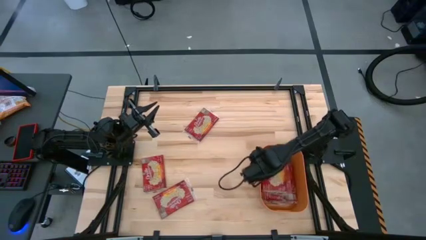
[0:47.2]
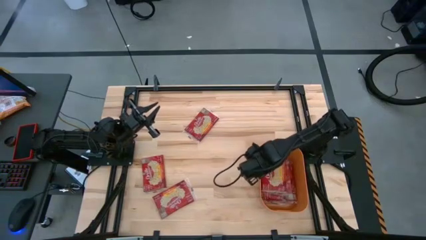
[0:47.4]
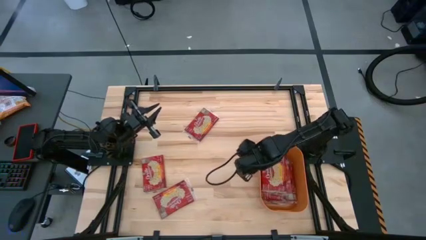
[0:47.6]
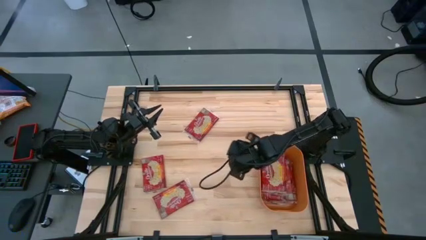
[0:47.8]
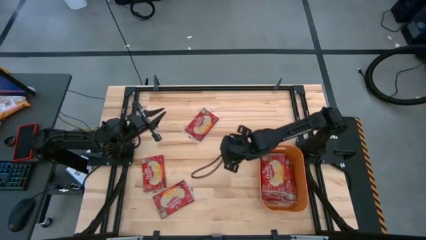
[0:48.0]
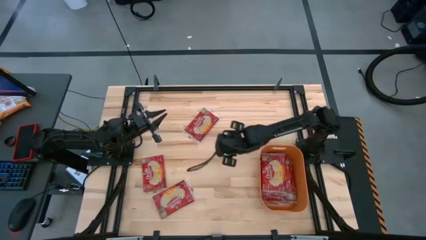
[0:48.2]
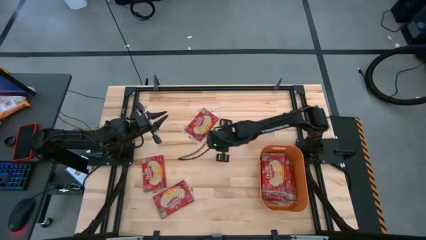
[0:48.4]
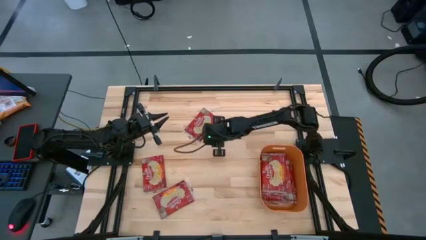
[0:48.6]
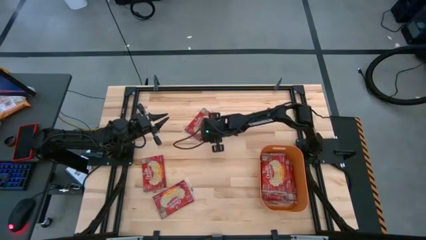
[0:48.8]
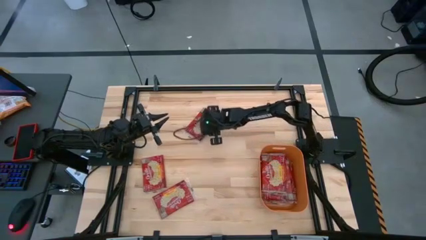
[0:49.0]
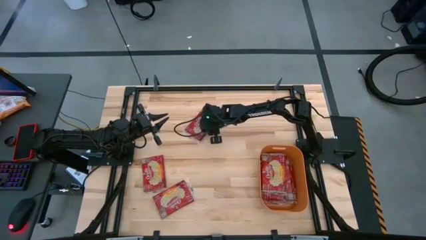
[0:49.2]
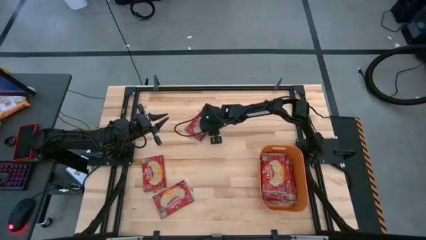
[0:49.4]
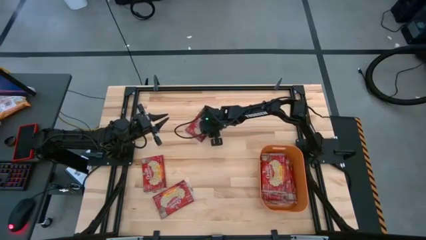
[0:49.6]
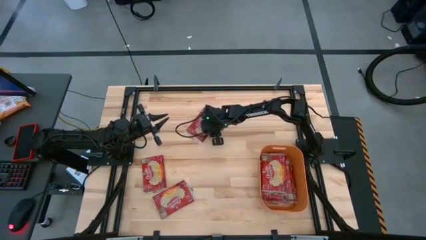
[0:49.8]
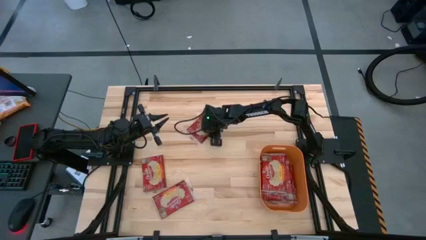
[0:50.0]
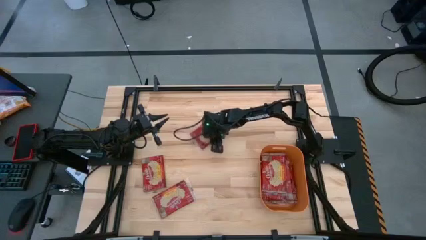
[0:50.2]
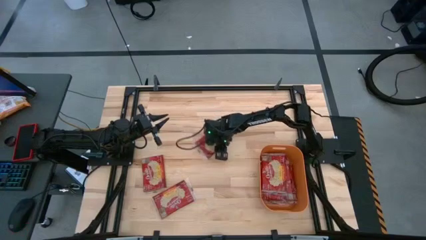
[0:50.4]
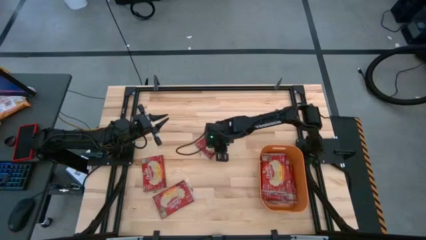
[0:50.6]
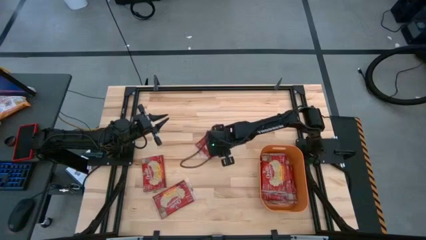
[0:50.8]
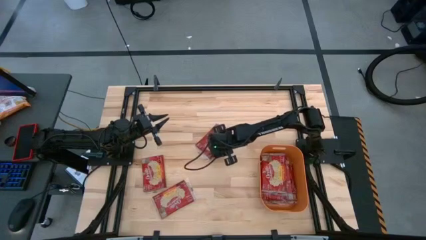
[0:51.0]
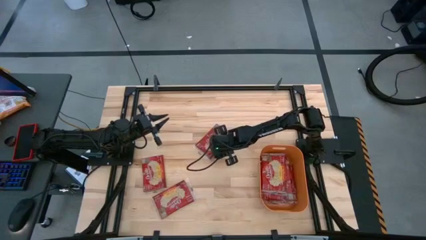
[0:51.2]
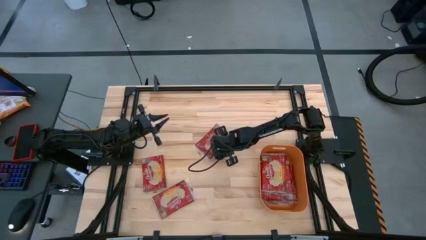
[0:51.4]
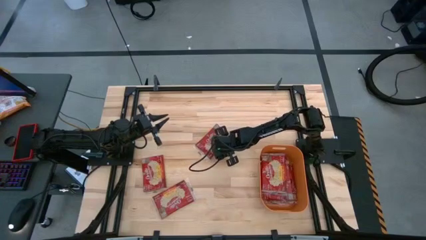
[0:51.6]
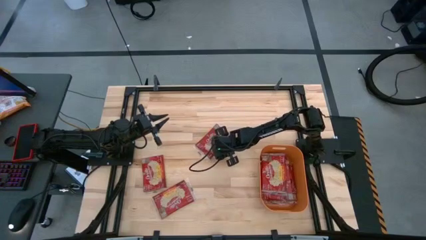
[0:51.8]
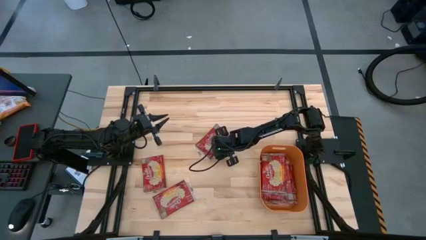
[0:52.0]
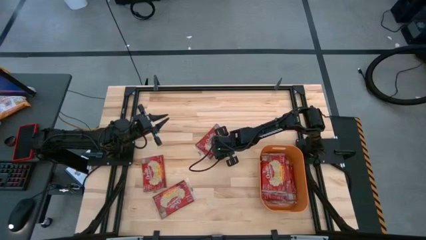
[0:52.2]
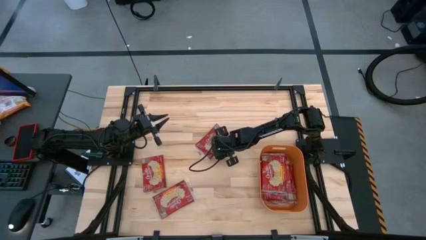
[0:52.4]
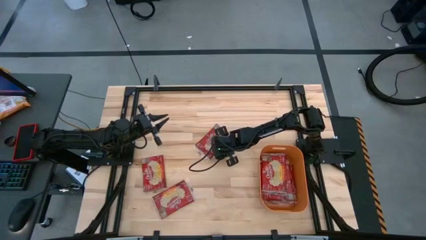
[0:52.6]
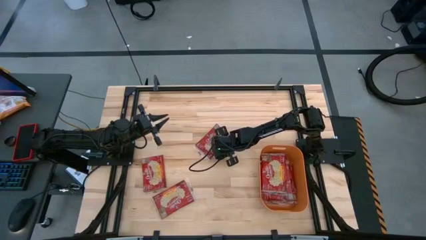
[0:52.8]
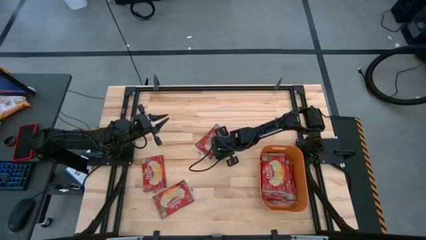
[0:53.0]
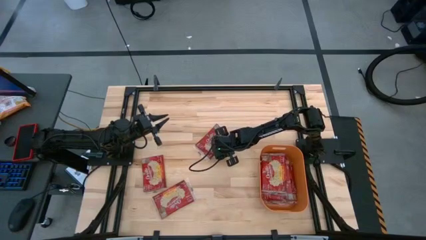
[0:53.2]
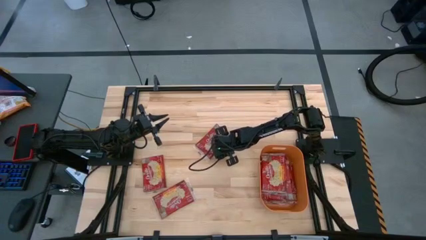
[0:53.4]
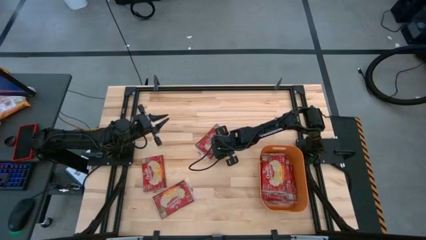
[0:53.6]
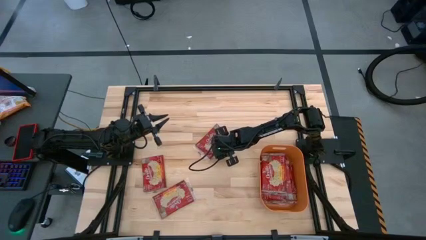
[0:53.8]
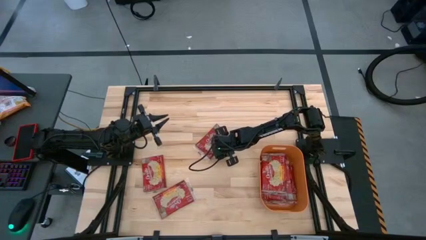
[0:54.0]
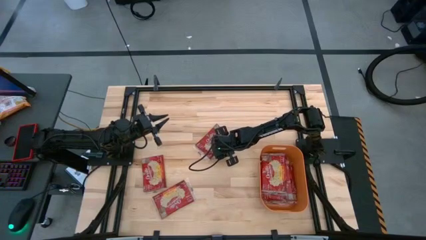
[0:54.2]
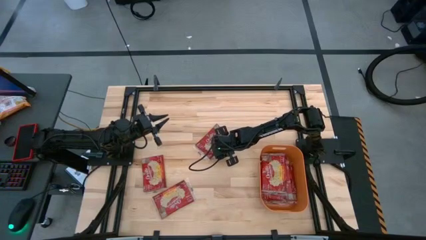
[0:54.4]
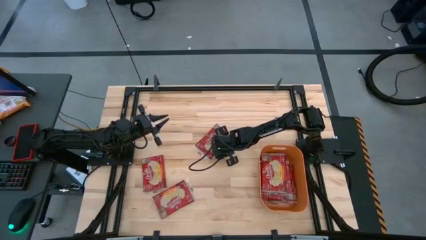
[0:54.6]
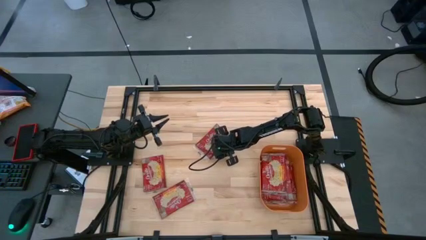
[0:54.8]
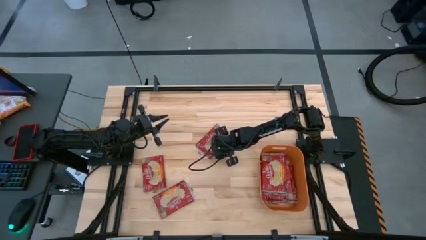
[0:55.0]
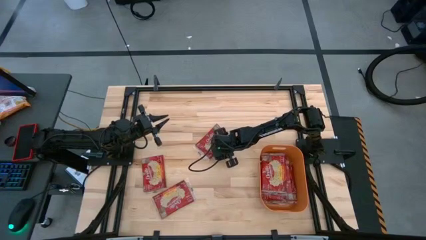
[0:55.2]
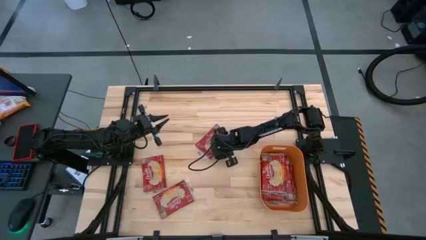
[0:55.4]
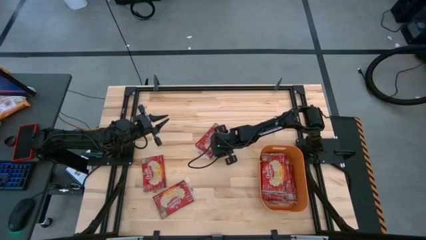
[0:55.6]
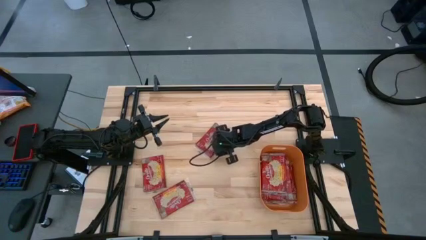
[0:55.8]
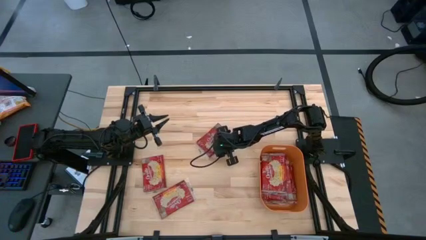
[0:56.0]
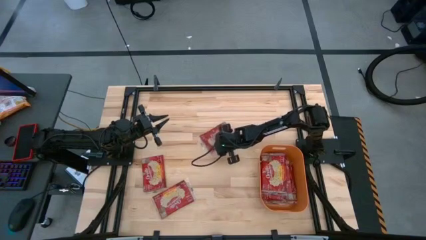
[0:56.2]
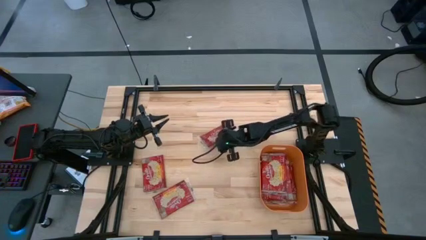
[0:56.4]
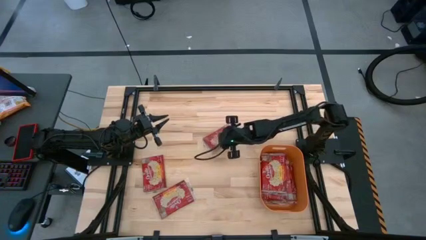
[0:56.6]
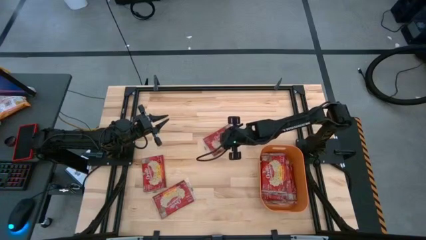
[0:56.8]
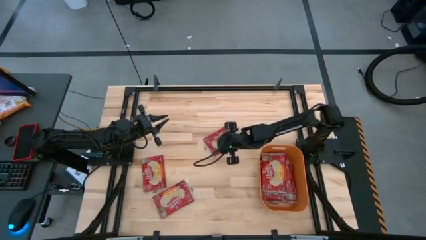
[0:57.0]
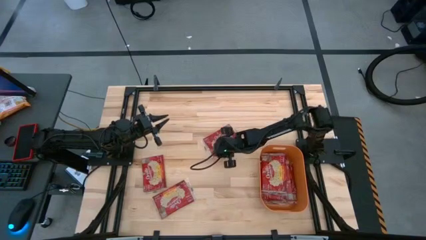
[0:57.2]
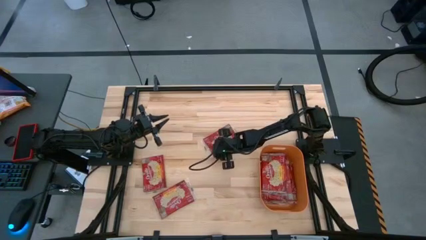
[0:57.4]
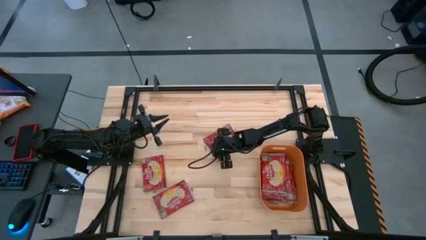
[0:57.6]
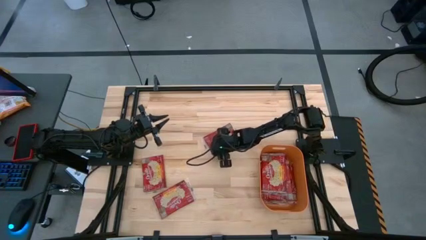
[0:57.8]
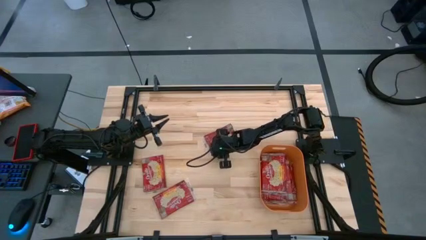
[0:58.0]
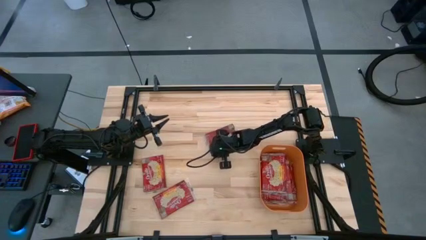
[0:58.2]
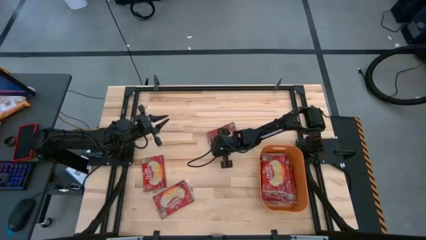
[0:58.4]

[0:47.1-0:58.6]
Task: Sort popcorn bags into baskets
Put the red popcorn bag into the orange bin

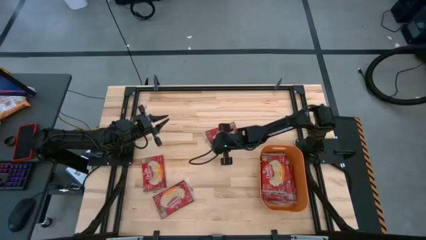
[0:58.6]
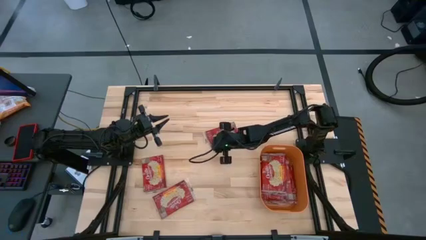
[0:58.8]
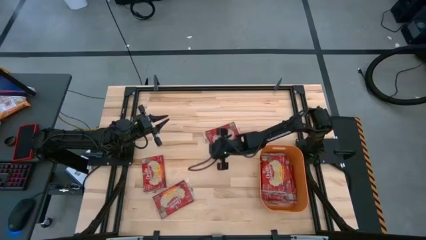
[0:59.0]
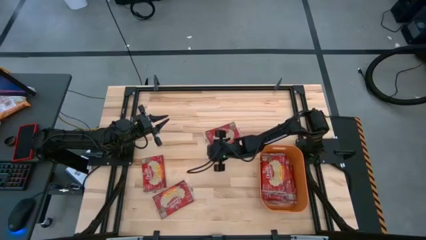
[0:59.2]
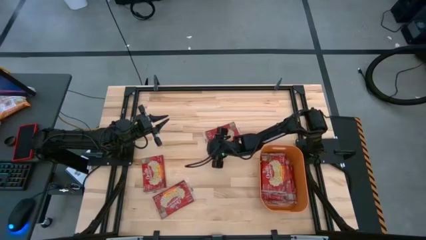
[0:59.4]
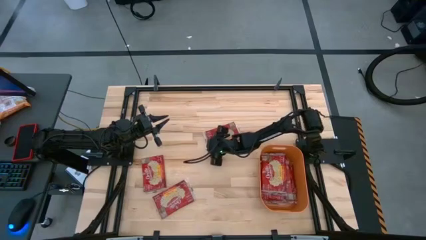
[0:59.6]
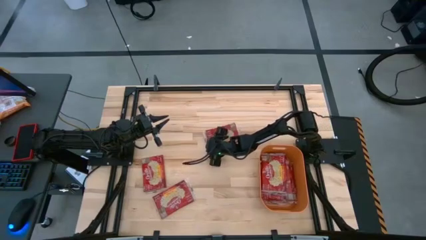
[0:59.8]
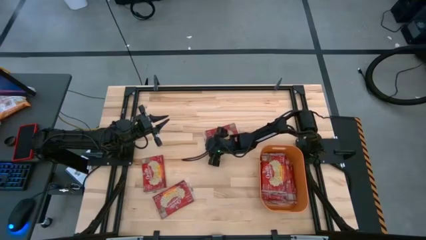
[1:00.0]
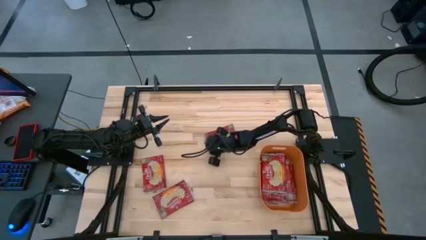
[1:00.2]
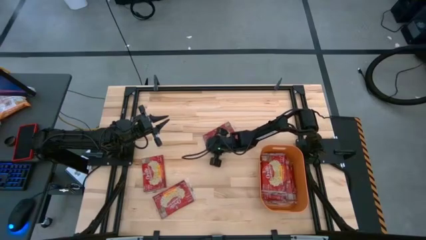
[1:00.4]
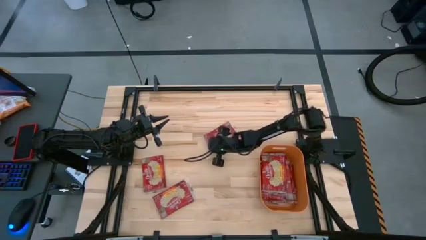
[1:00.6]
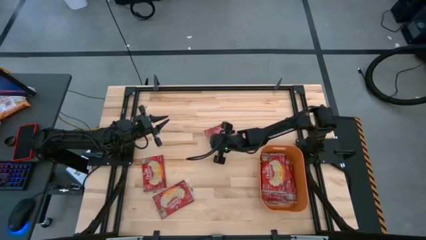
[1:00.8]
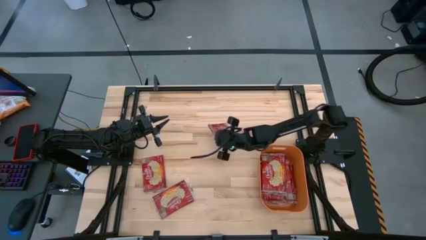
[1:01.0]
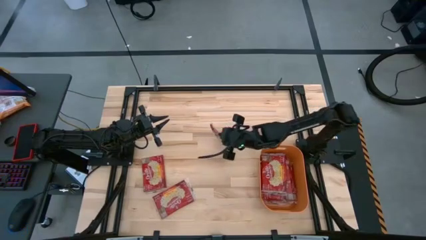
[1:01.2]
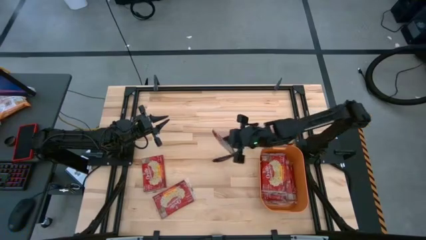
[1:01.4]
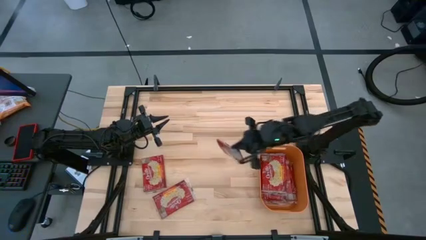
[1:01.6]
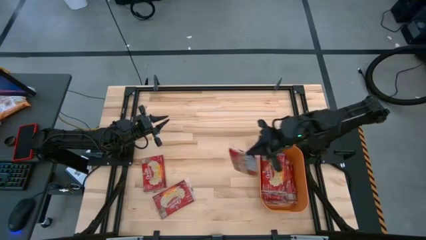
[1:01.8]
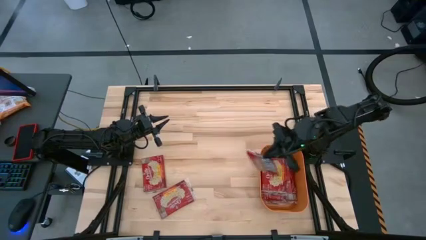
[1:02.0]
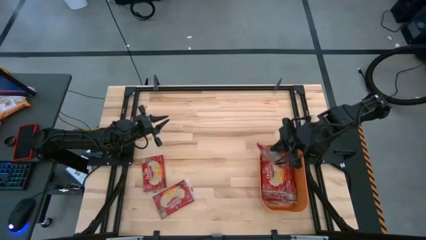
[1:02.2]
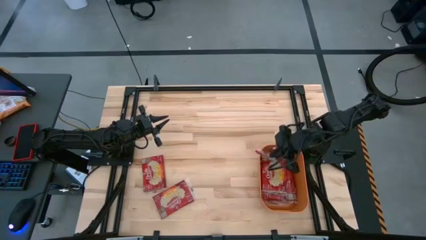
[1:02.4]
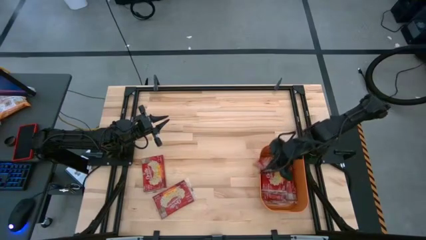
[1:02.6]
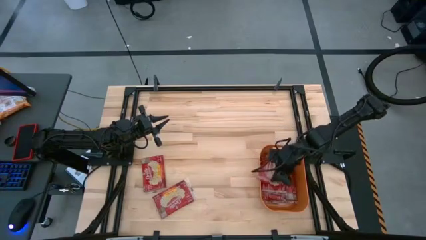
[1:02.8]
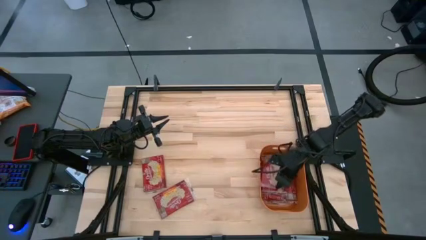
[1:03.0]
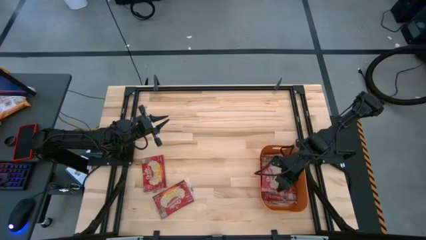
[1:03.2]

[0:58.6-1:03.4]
Put the red popcorn bag into the orange bin
